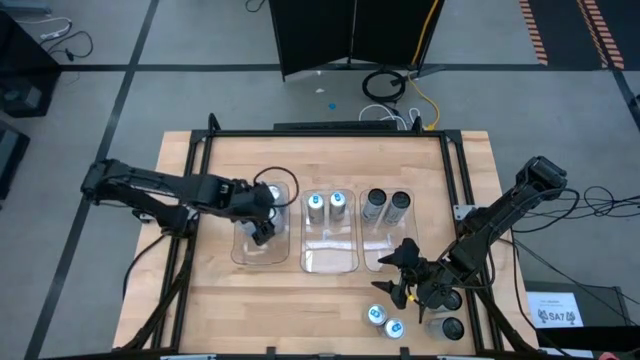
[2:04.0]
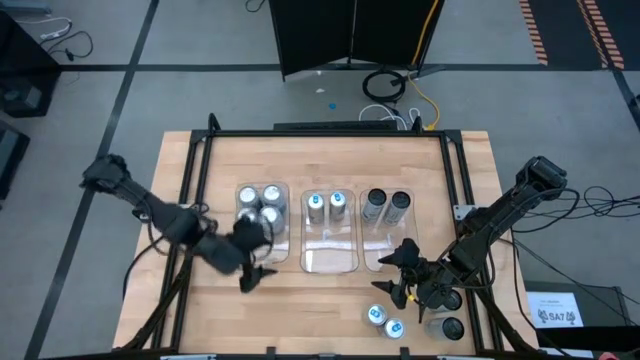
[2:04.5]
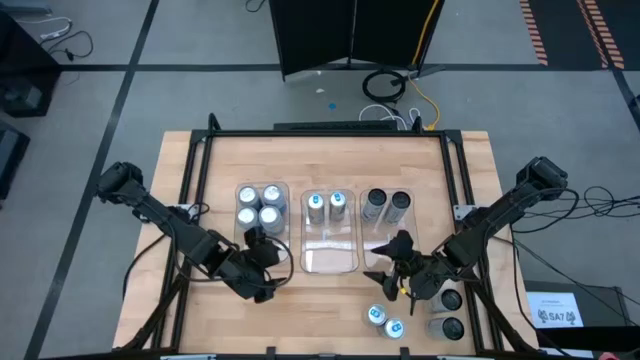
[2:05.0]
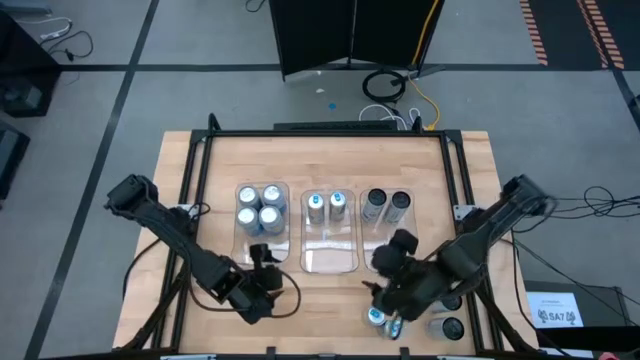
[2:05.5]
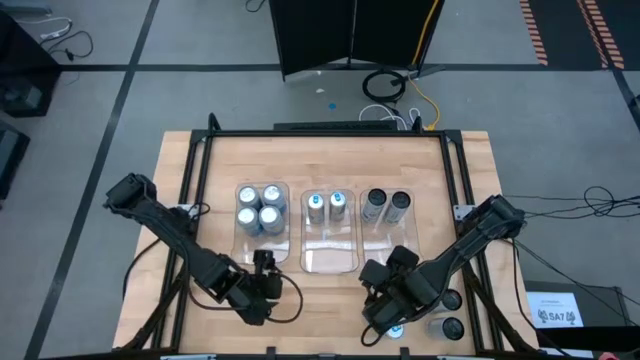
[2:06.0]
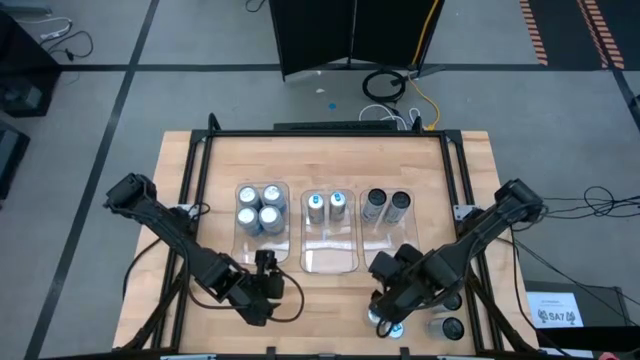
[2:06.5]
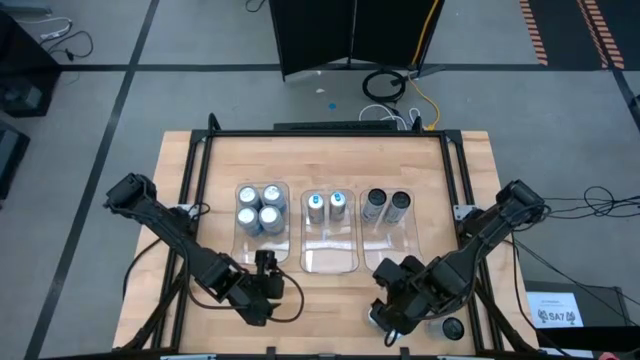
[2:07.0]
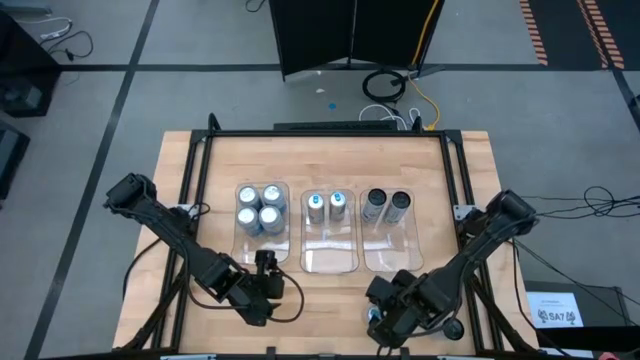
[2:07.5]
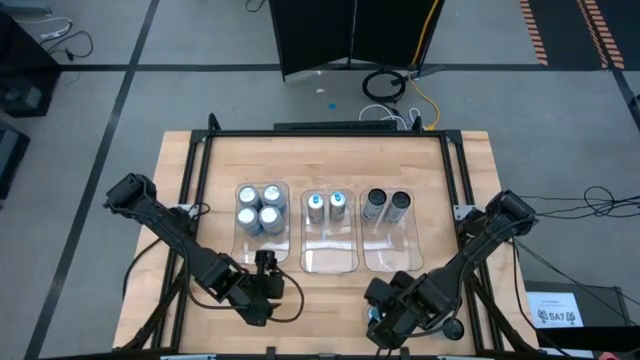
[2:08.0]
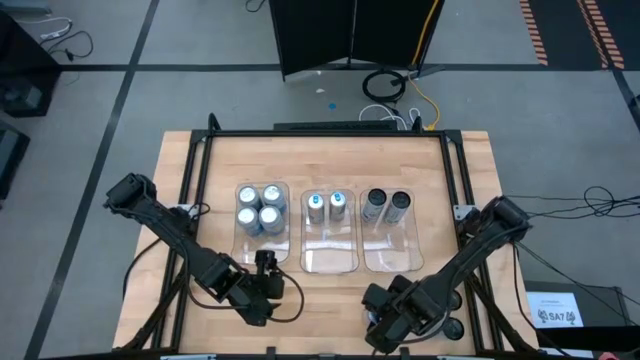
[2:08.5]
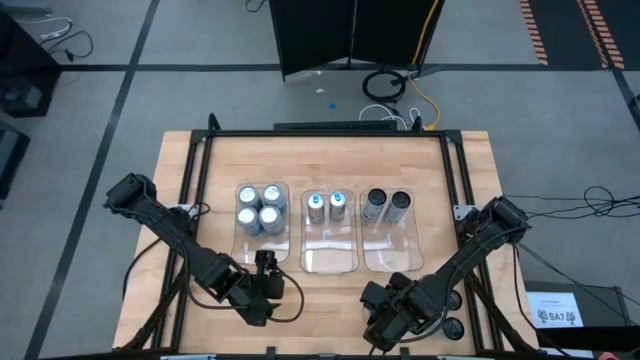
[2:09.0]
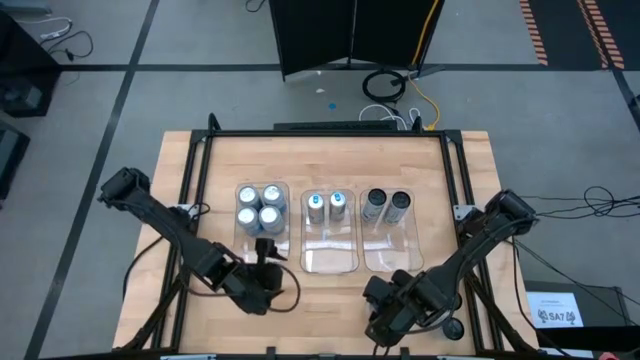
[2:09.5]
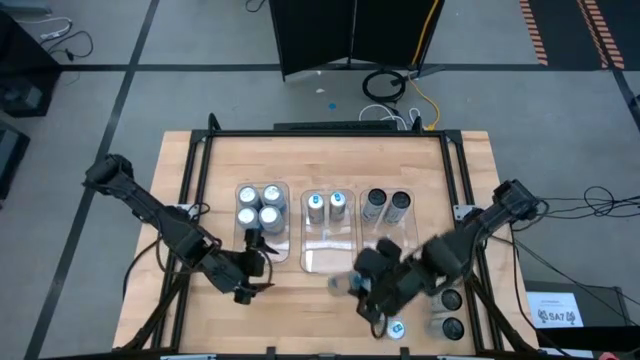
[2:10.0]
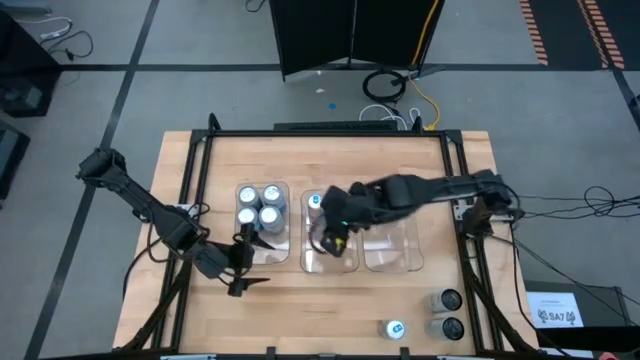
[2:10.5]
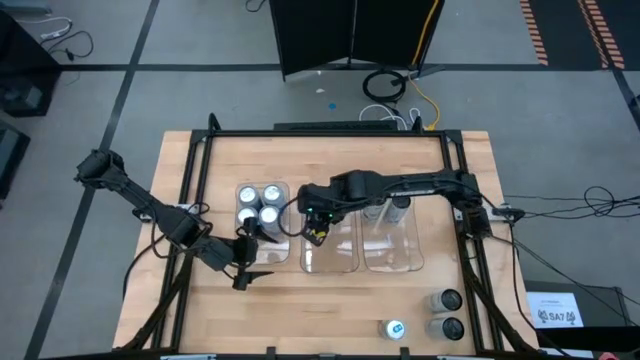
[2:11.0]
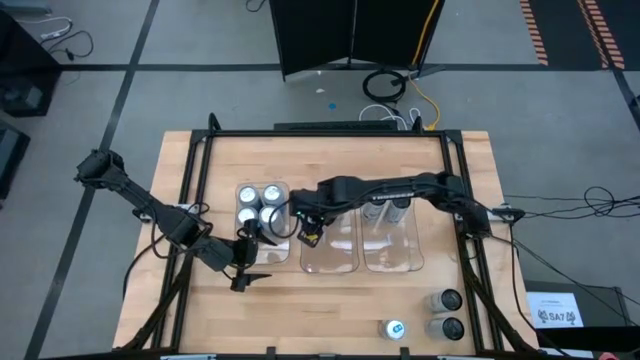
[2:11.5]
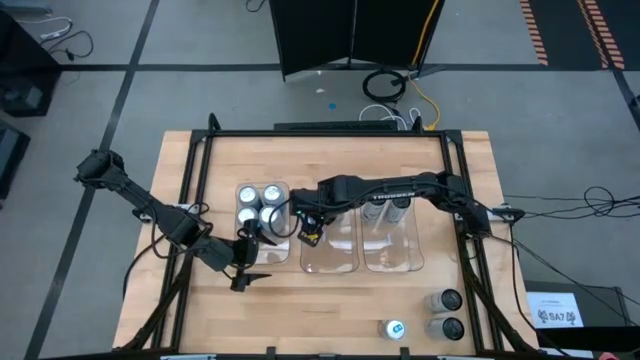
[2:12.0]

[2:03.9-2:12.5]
Task: Sort soda cans
Put the top blue soda can into the middle transparent bin

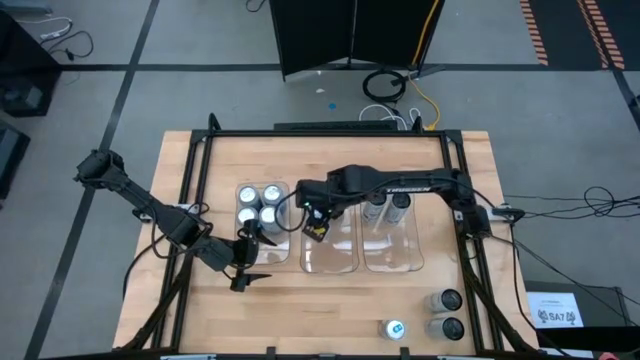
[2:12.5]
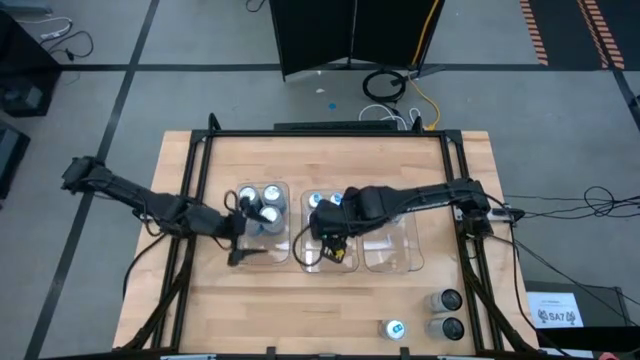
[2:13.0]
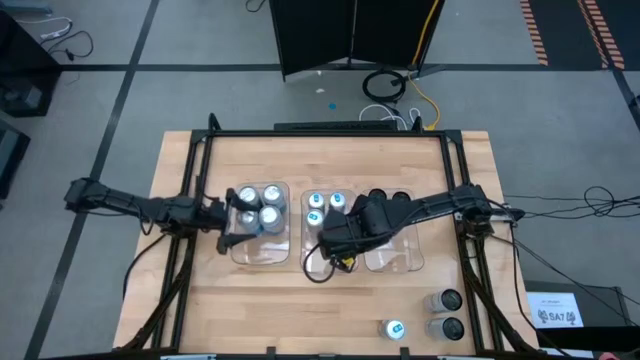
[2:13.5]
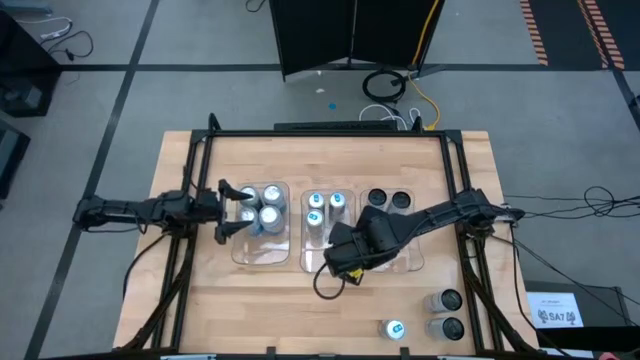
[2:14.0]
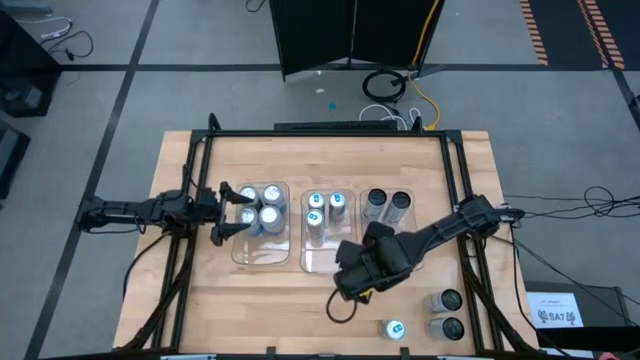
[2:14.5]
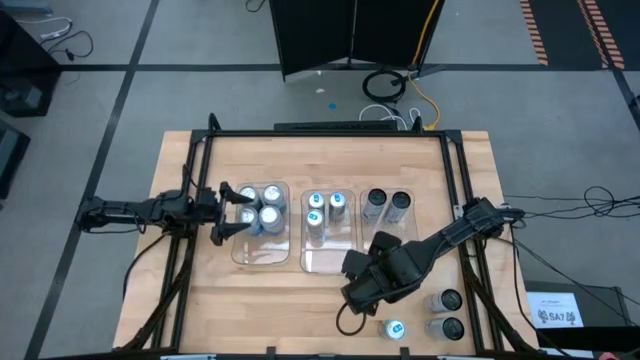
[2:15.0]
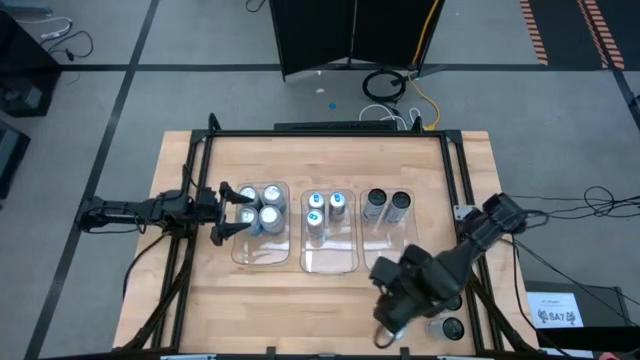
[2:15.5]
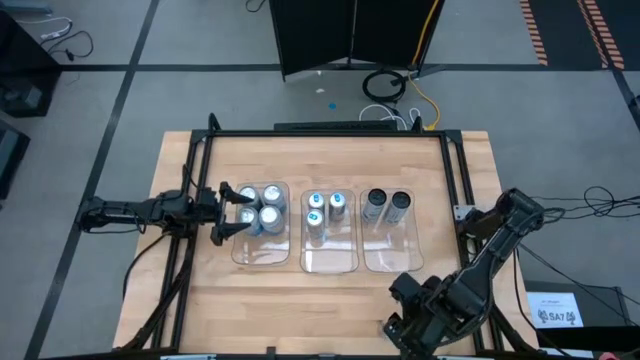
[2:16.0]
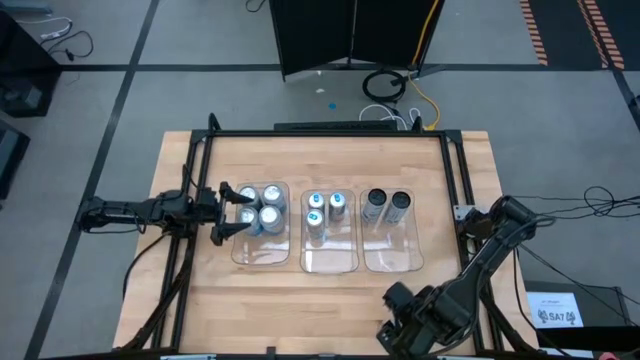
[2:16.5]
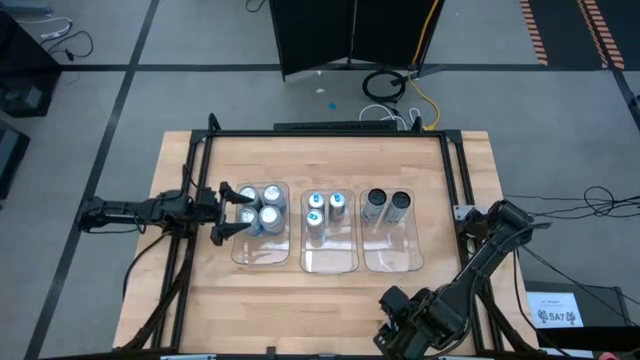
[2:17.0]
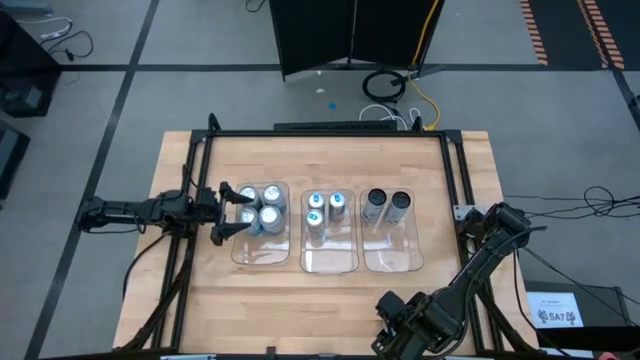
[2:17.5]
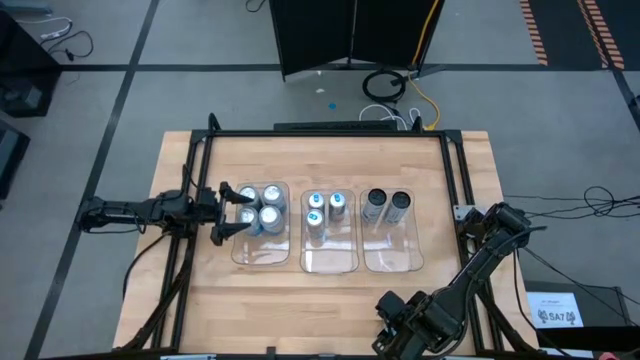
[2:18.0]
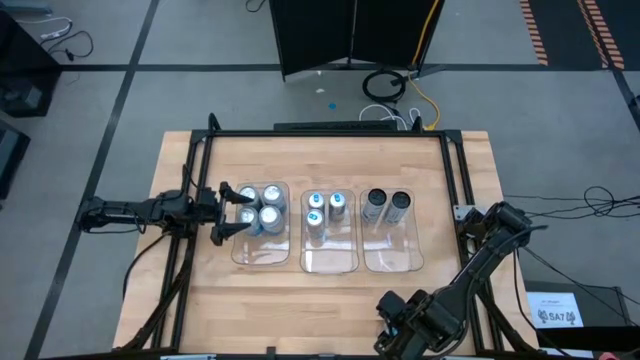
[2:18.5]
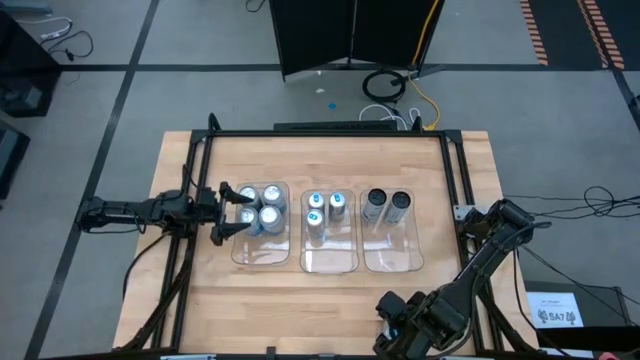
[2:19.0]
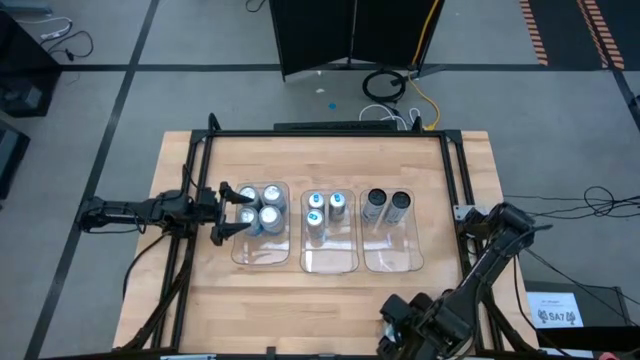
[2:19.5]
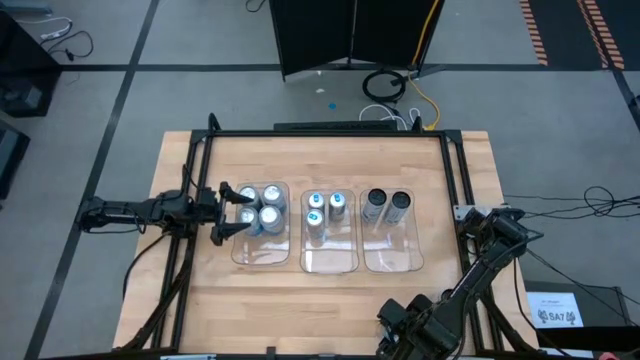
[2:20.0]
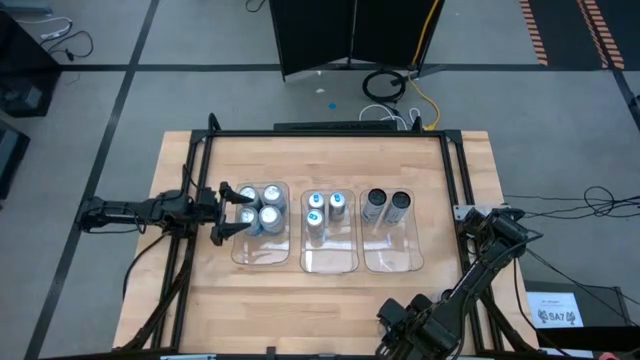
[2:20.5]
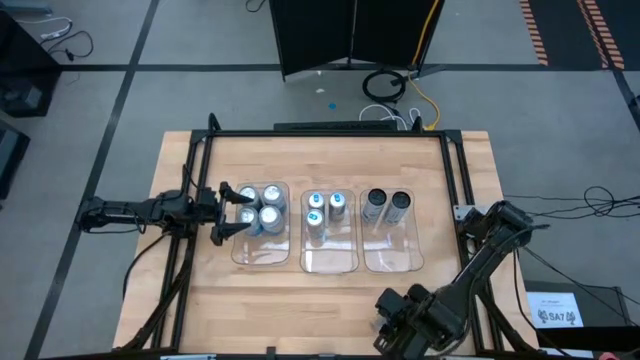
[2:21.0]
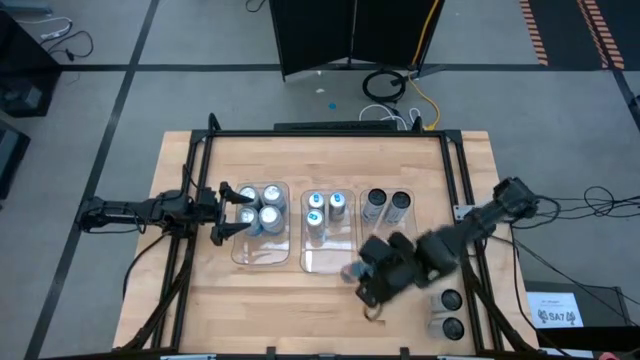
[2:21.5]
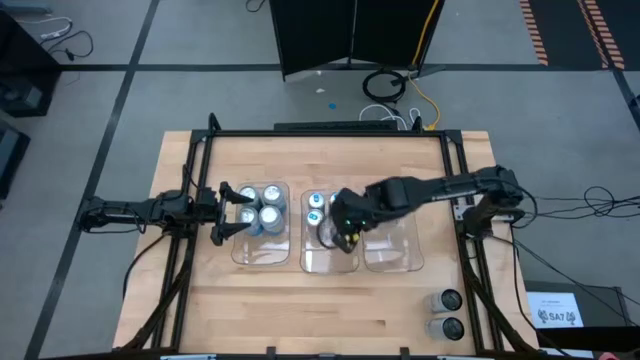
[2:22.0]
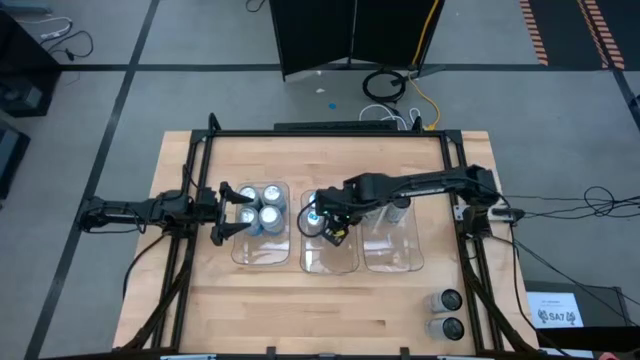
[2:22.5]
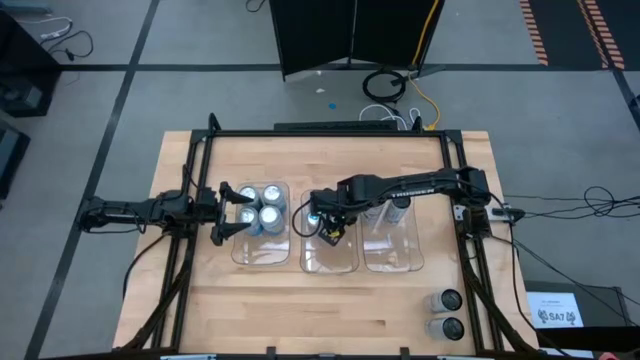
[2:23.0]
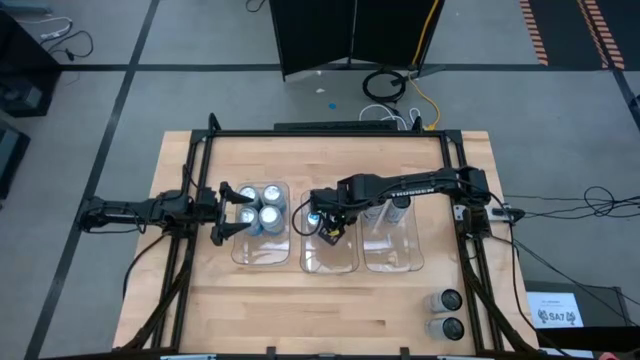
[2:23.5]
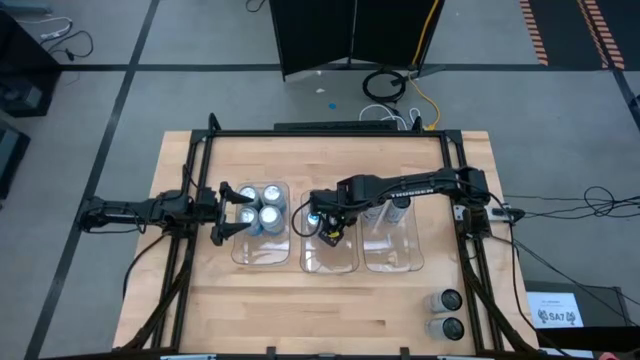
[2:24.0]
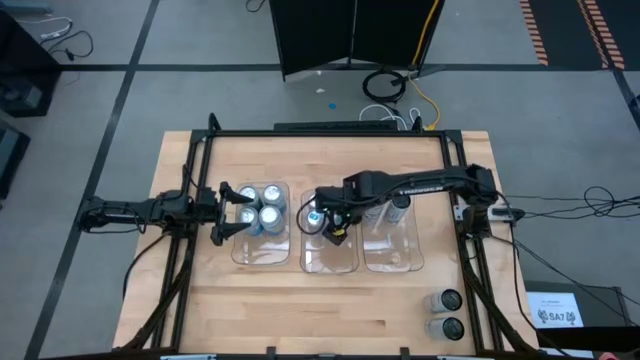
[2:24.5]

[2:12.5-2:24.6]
Put the blue soda can into the middle transparent bin

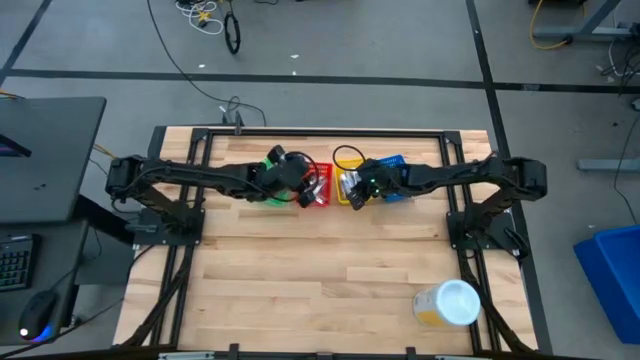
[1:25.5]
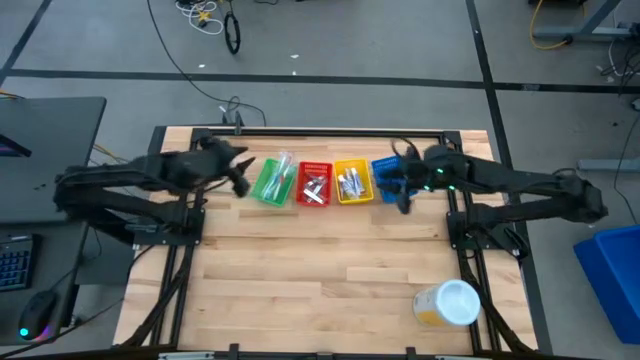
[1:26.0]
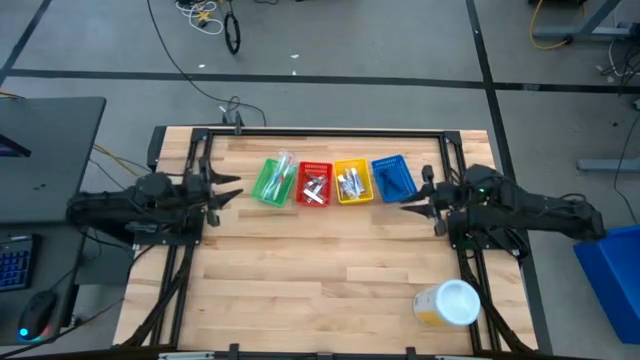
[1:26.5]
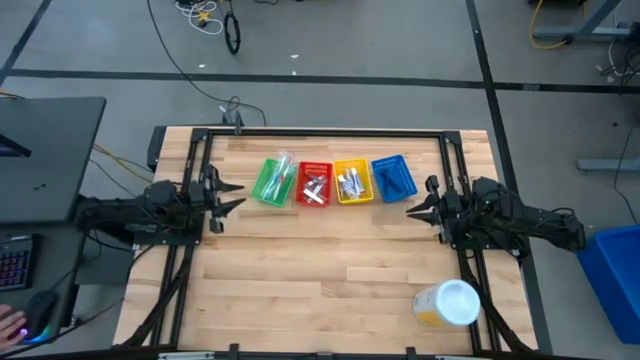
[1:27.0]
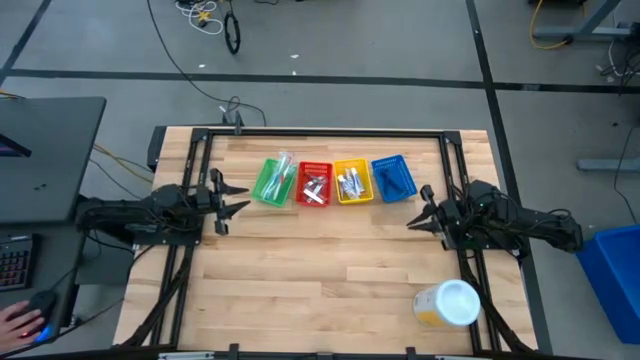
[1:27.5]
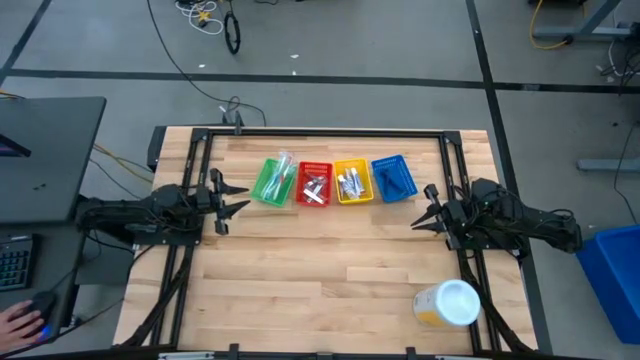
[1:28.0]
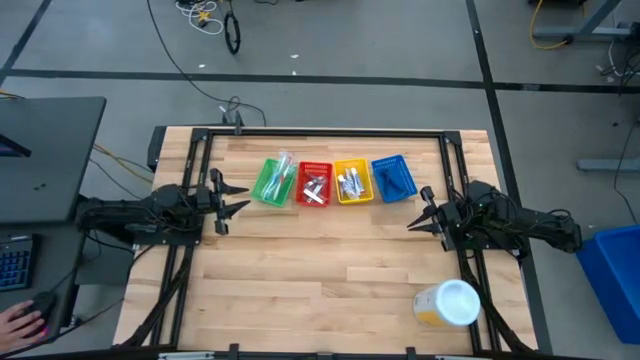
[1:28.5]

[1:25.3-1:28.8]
Task: Pick & Place Travel size toiletries
Return to Home Position
